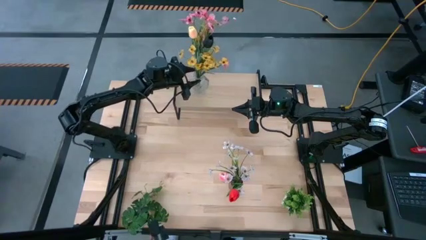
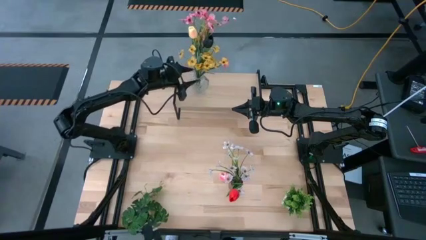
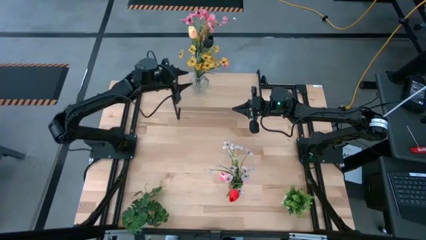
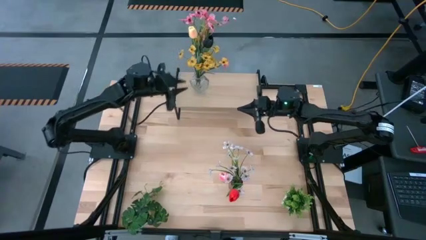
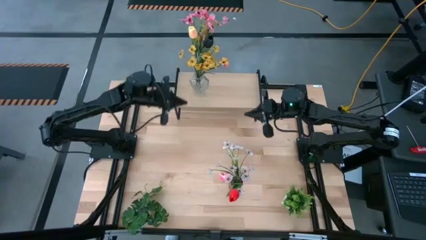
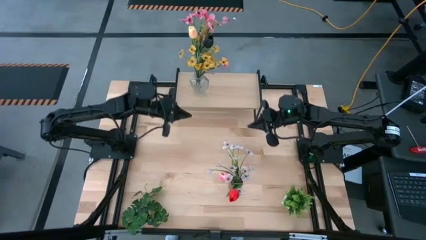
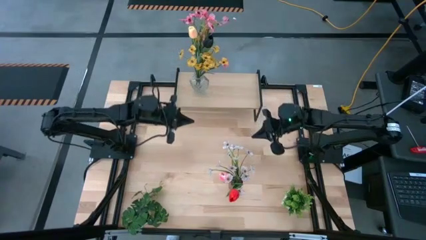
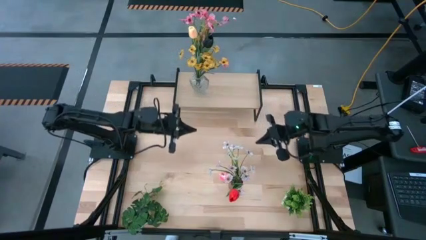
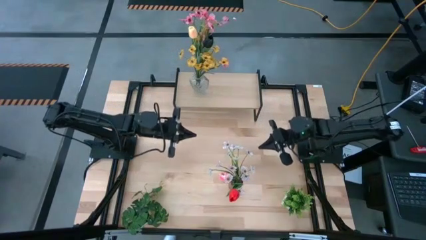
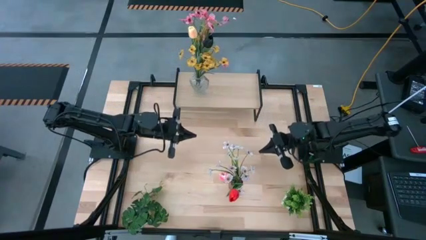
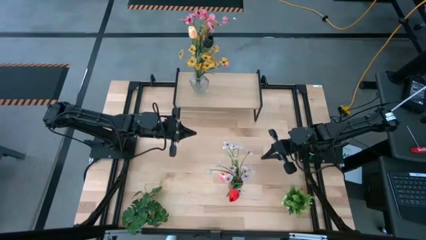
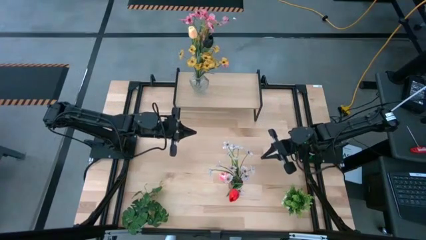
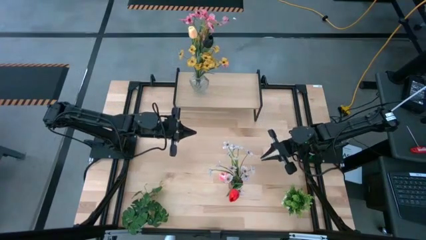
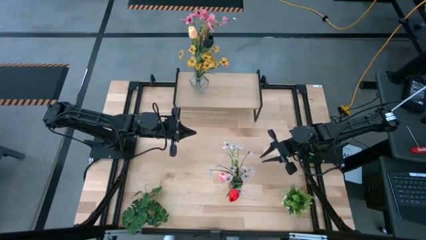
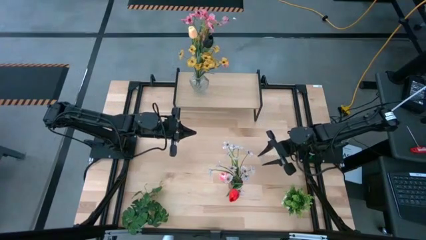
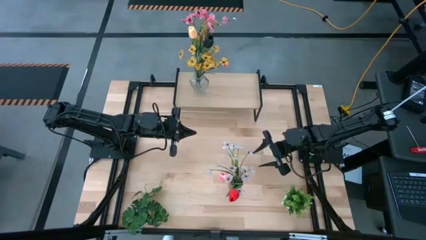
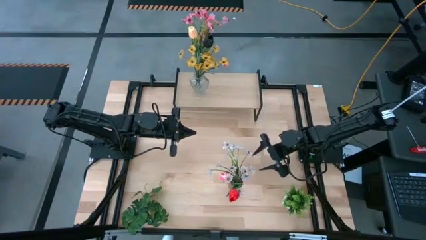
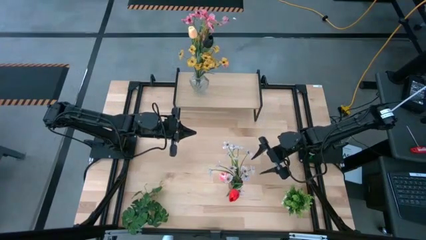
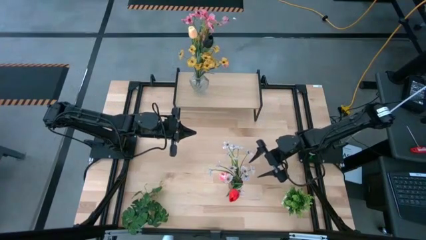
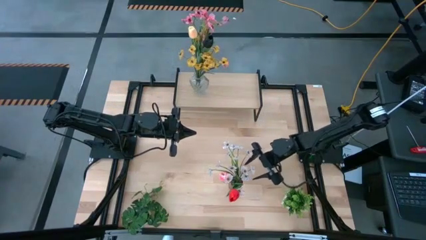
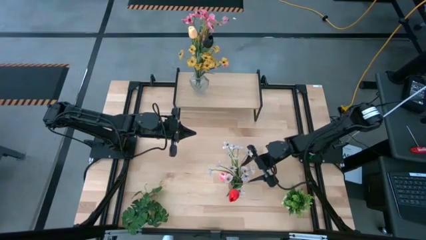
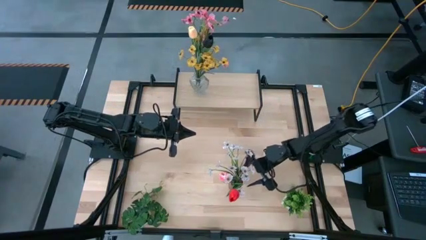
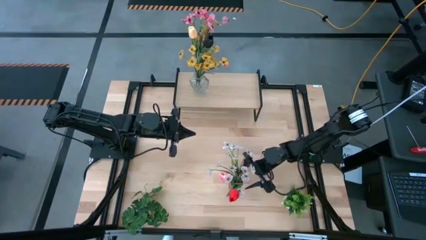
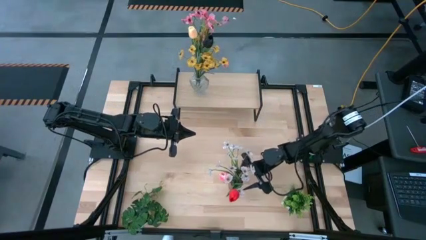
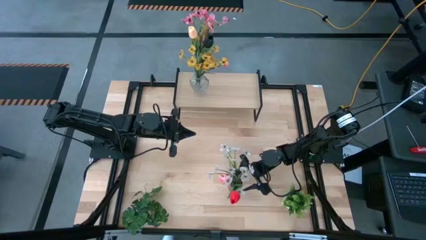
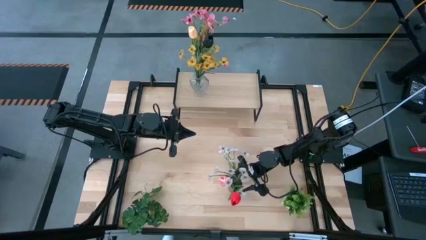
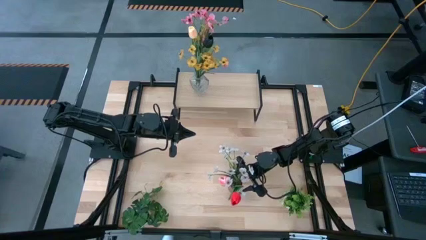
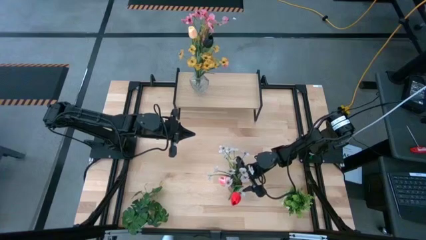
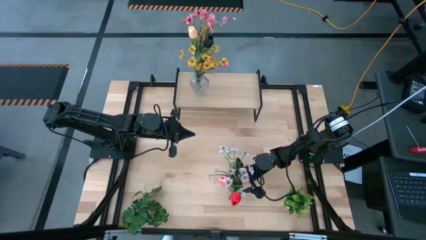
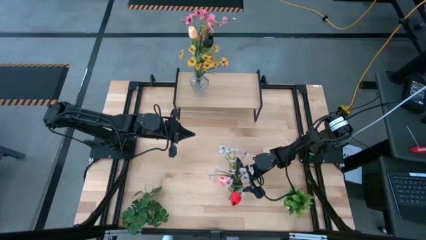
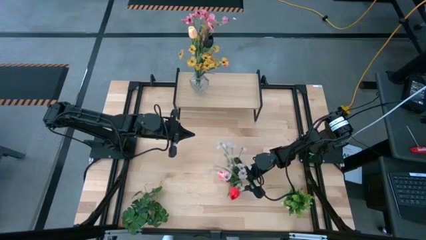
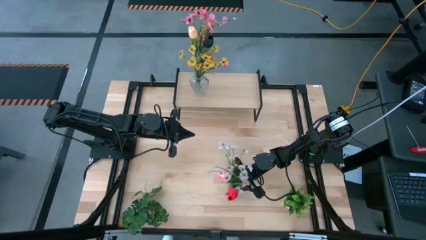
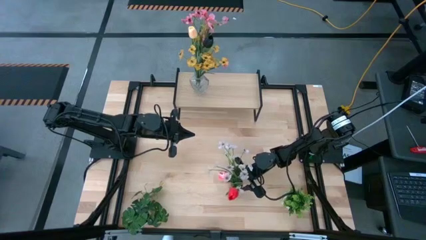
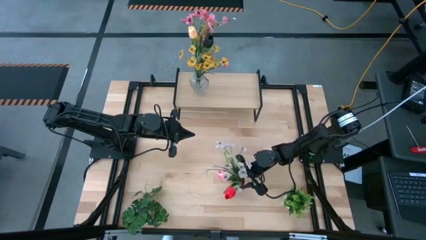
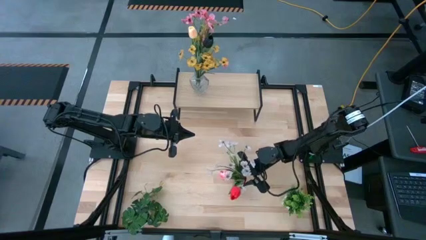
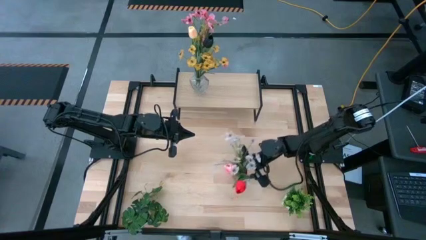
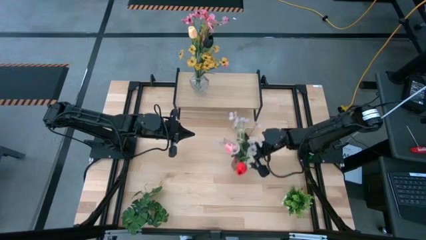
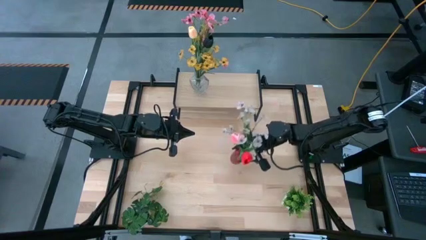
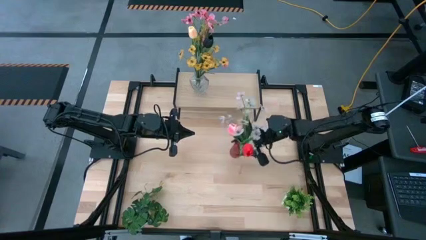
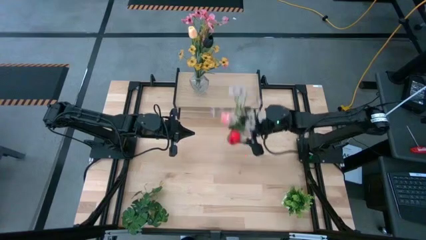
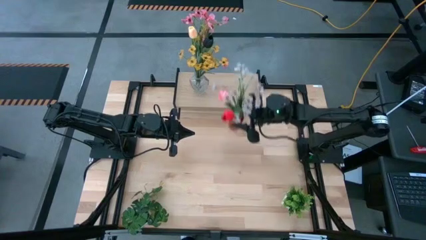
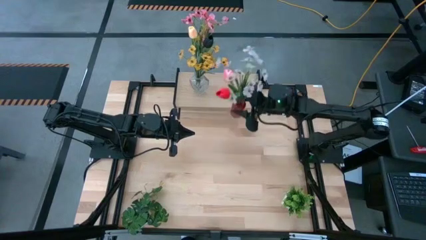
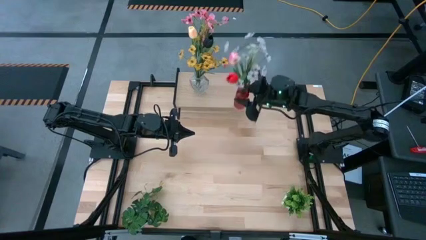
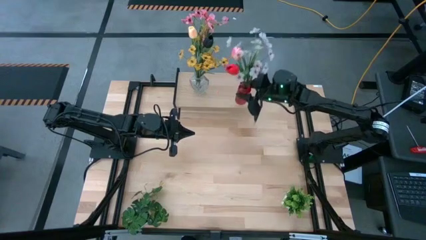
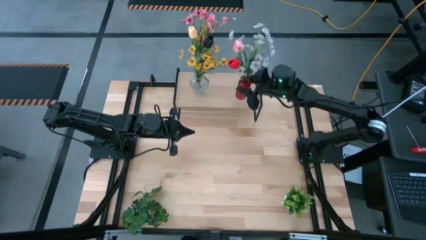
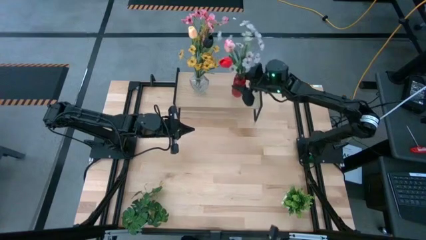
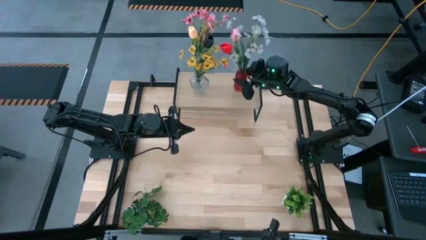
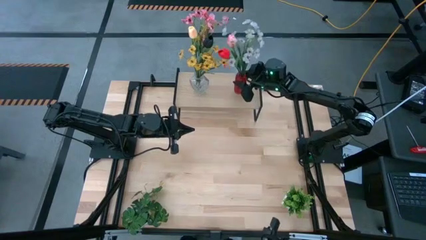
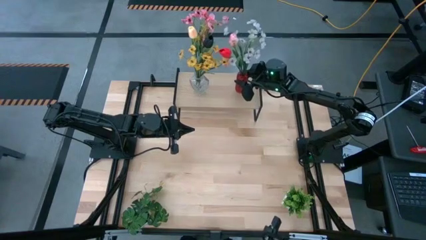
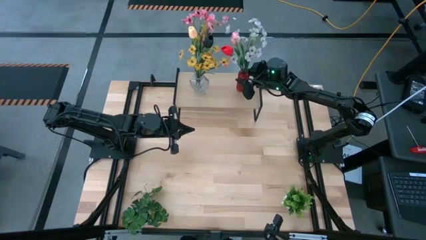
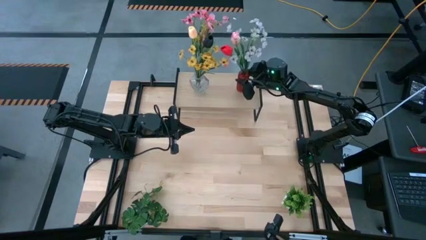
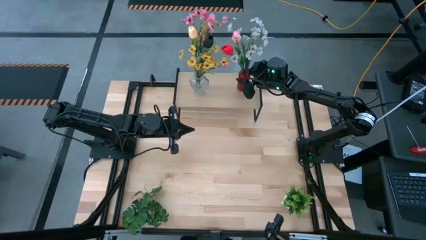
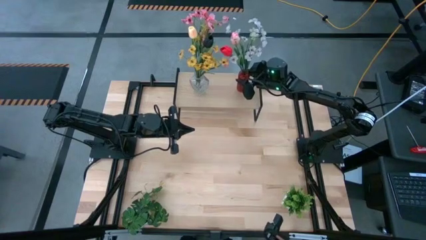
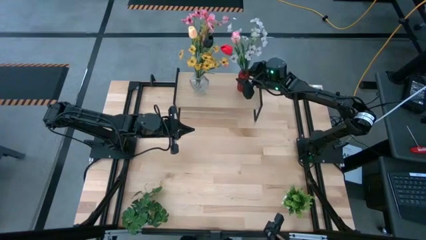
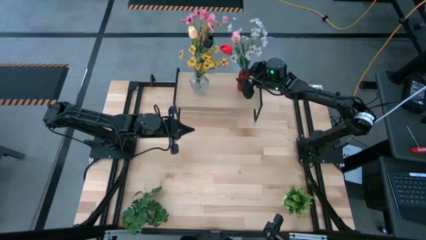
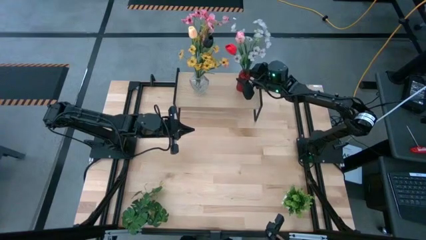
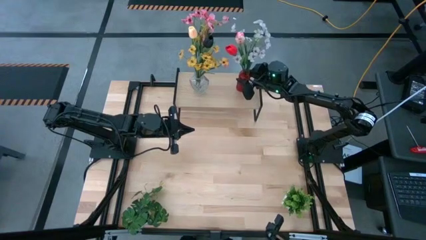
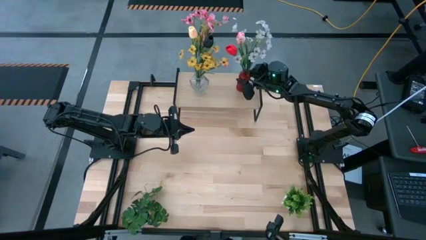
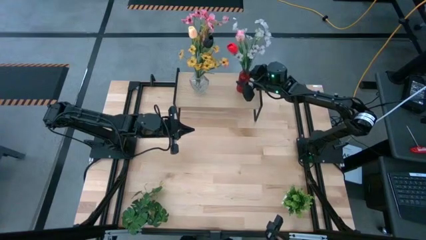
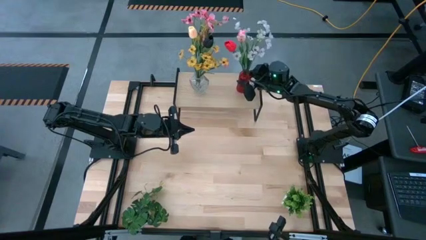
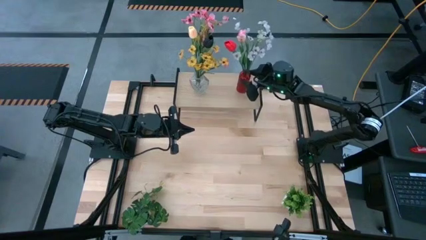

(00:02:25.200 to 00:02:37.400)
Task: Pick and place flowers into a vace then onto a shelf
Put the red vase with flowers on the shelf

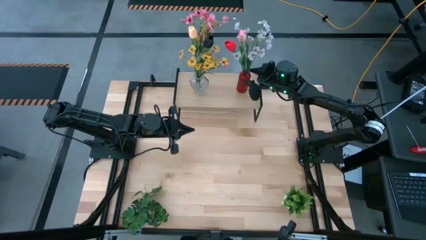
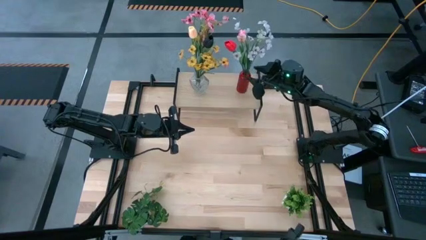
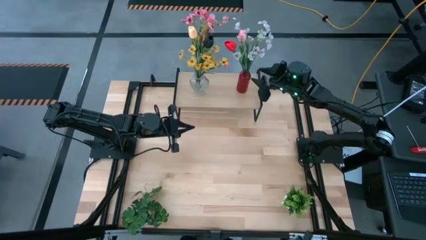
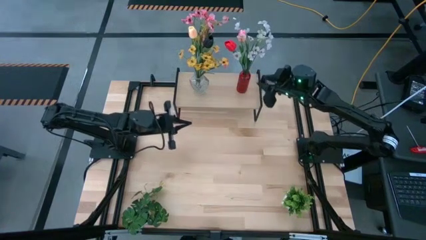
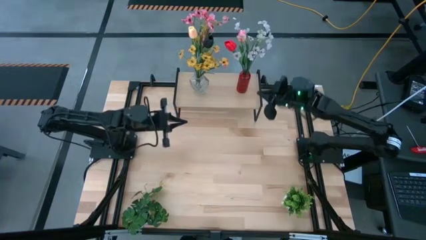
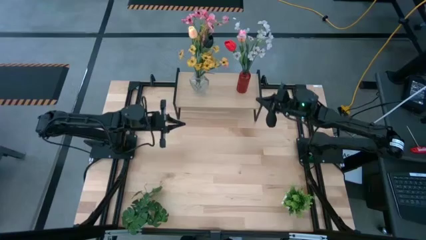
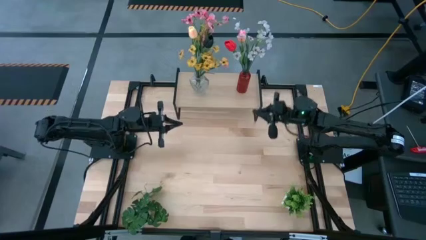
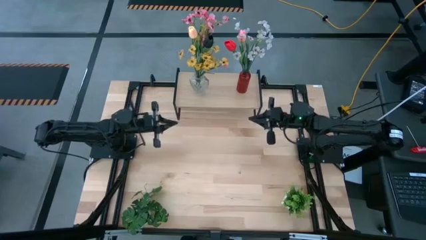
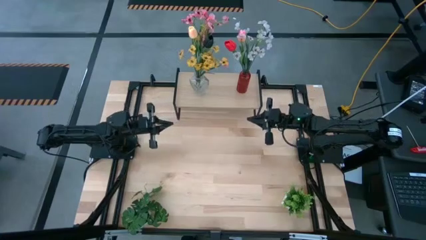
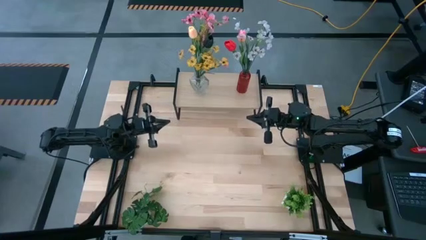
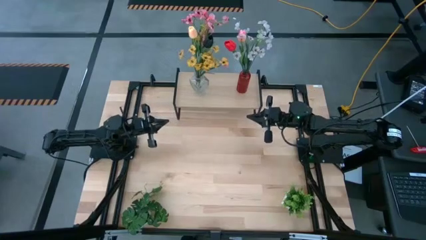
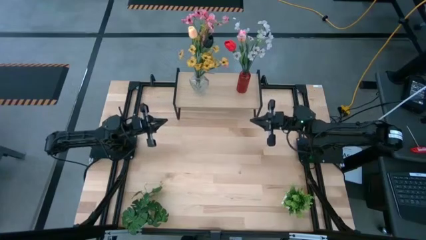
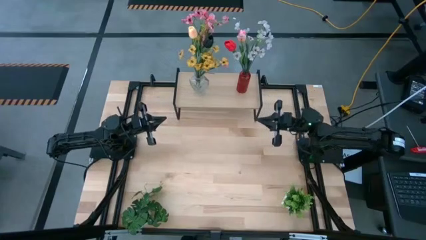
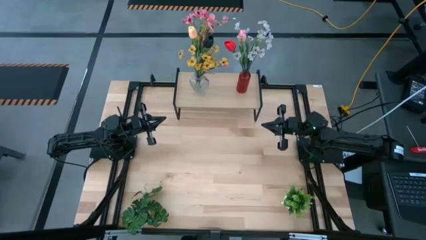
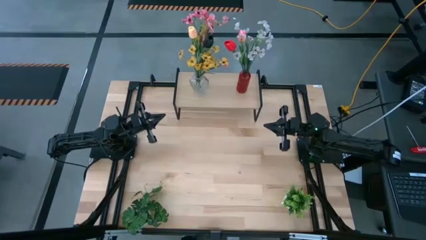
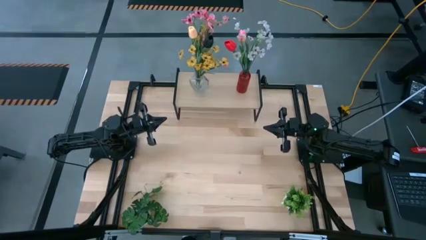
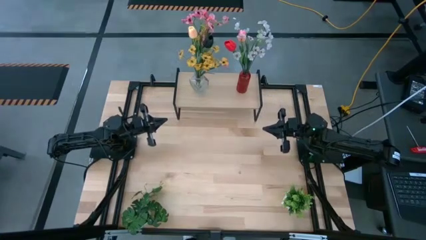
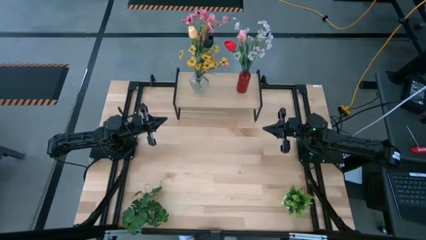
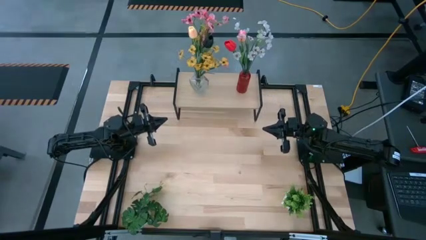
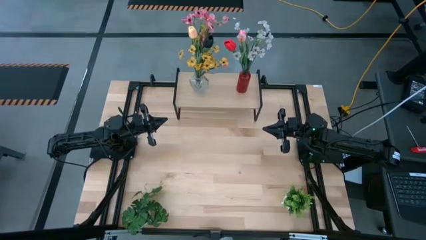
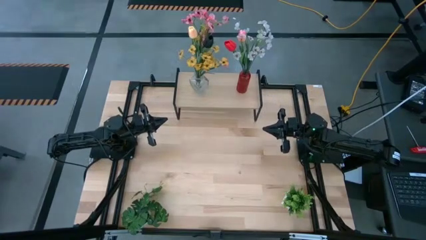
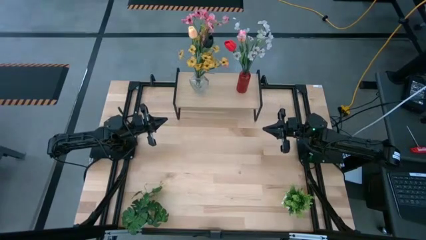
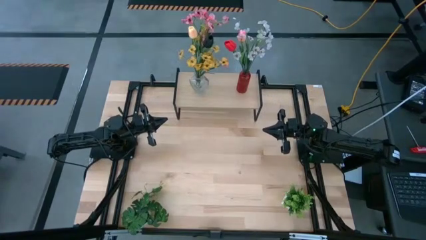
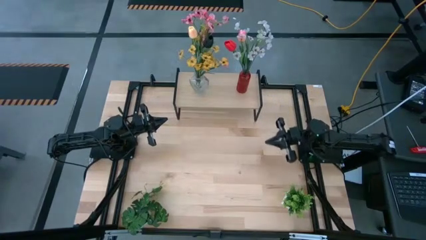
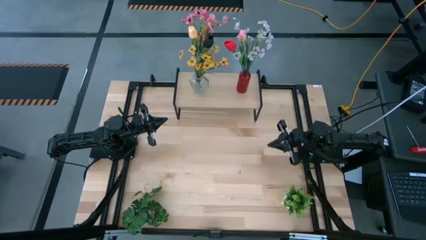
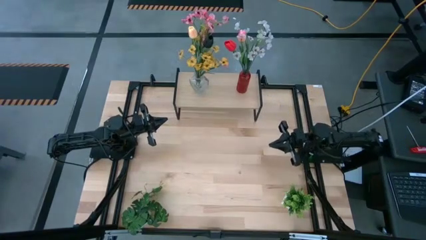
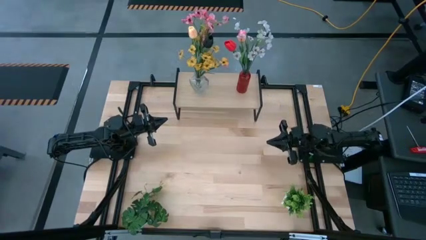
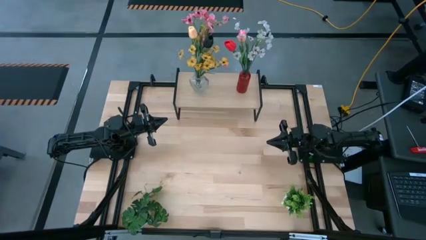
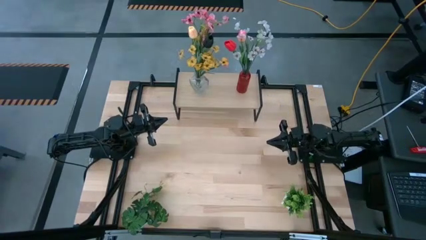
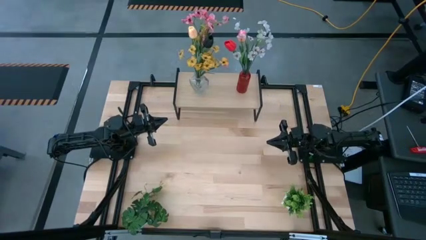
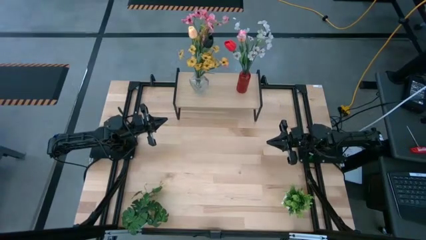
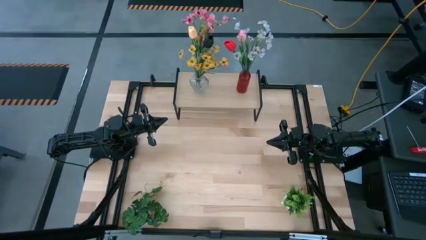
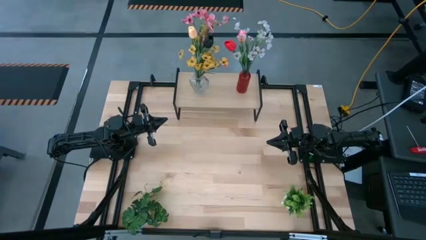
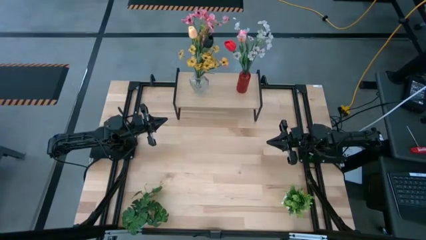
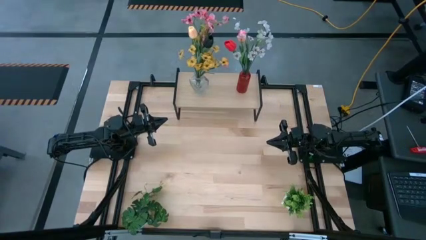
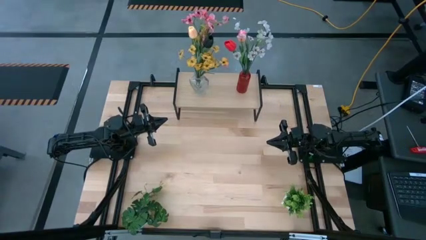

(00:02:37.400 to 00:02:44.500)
Return to Home Position
